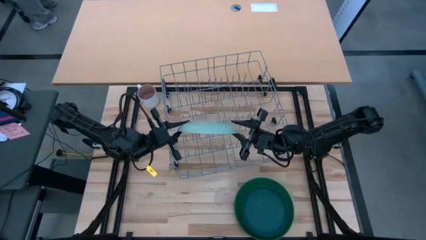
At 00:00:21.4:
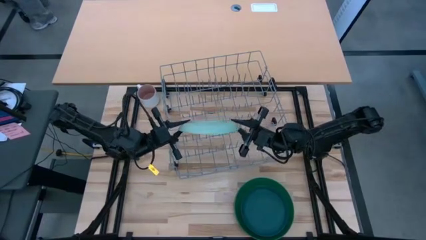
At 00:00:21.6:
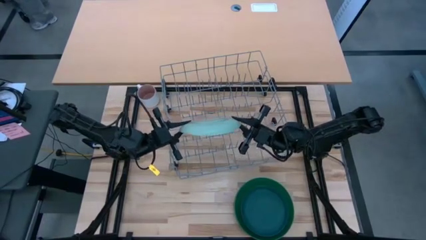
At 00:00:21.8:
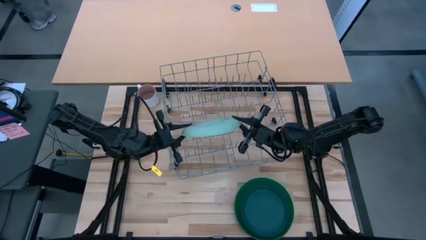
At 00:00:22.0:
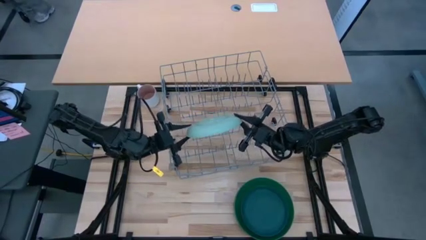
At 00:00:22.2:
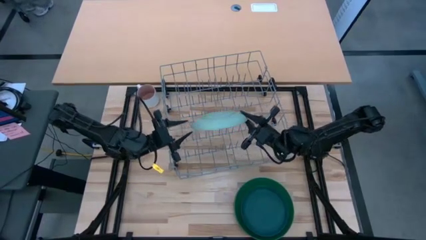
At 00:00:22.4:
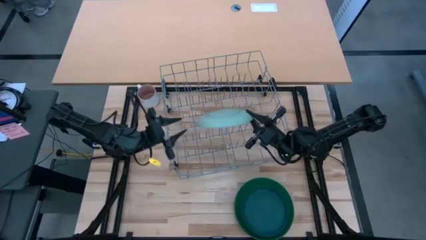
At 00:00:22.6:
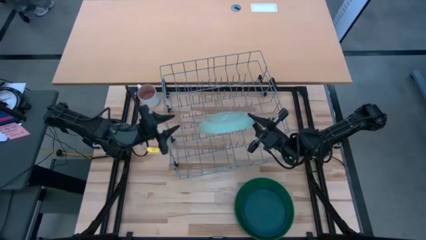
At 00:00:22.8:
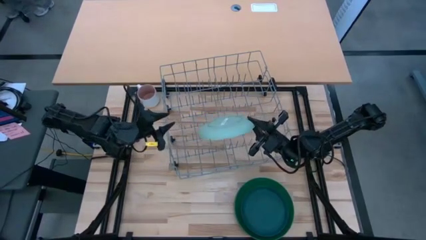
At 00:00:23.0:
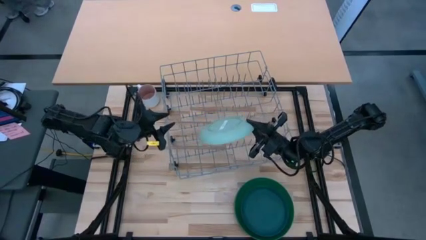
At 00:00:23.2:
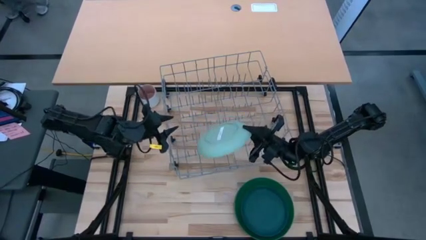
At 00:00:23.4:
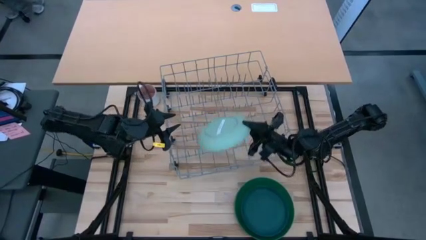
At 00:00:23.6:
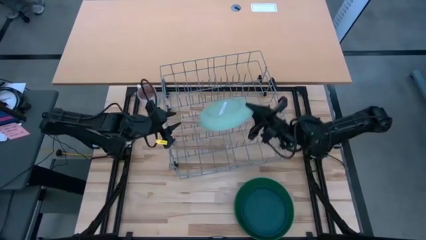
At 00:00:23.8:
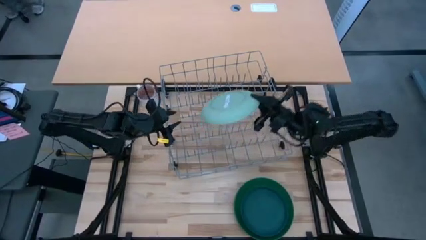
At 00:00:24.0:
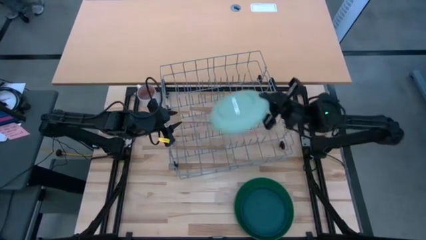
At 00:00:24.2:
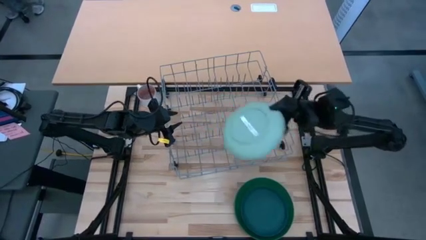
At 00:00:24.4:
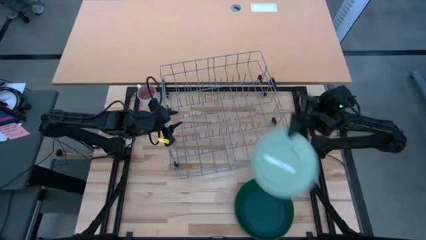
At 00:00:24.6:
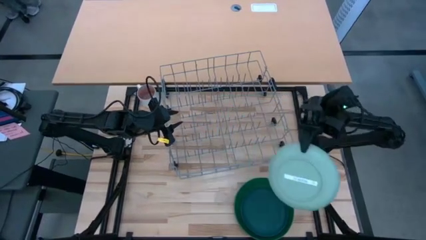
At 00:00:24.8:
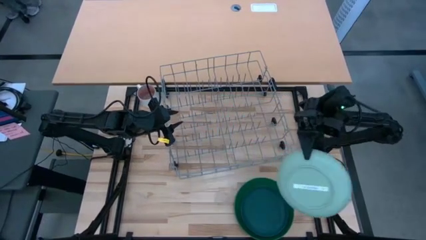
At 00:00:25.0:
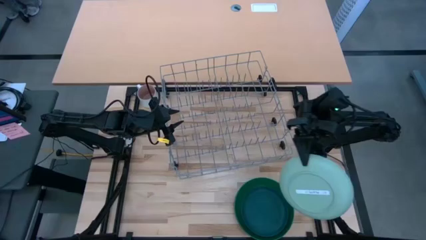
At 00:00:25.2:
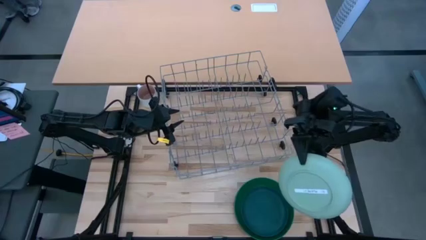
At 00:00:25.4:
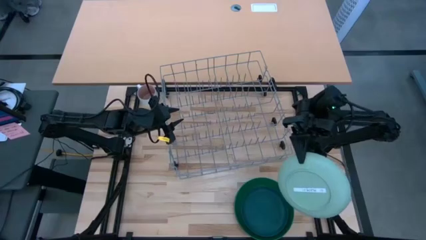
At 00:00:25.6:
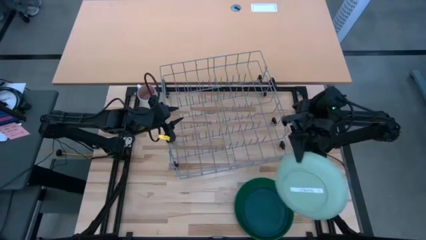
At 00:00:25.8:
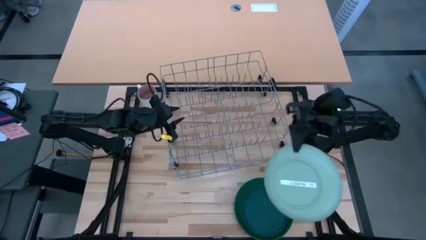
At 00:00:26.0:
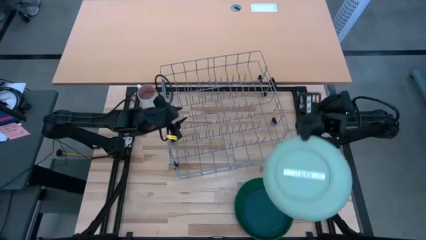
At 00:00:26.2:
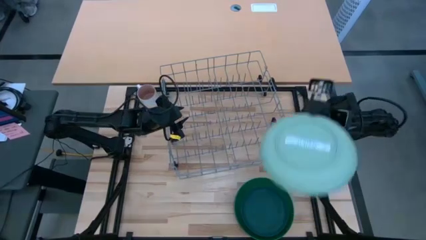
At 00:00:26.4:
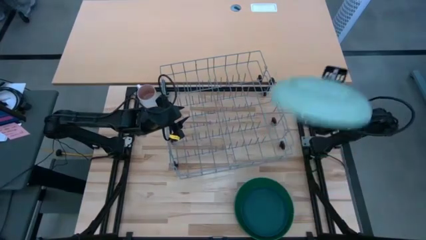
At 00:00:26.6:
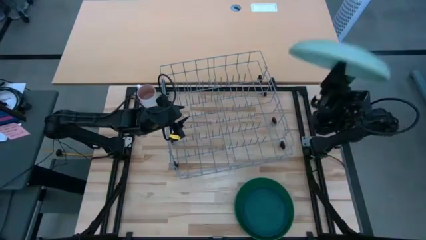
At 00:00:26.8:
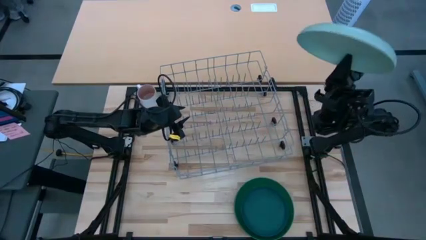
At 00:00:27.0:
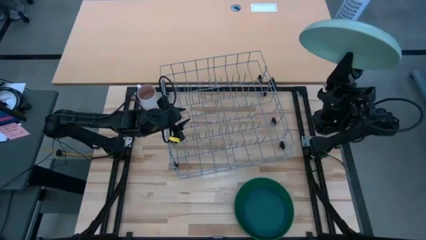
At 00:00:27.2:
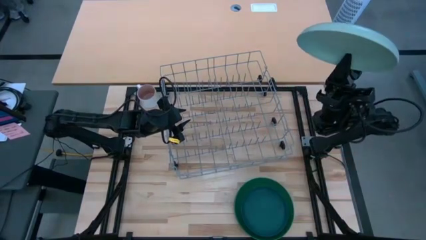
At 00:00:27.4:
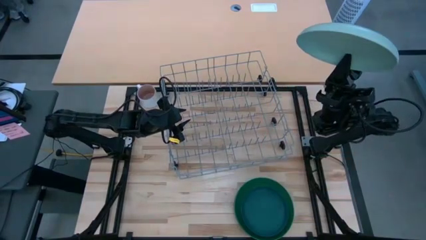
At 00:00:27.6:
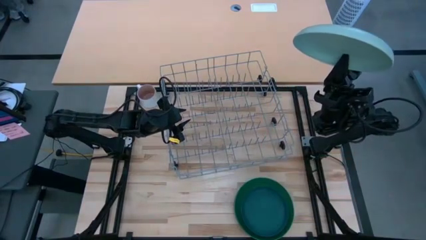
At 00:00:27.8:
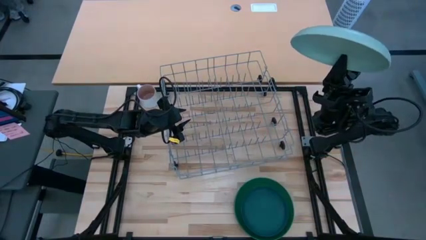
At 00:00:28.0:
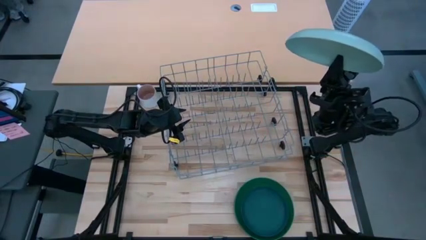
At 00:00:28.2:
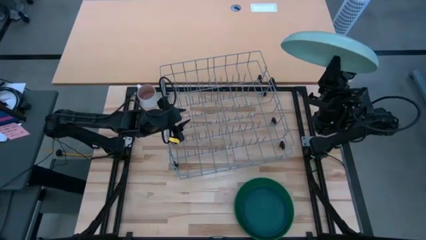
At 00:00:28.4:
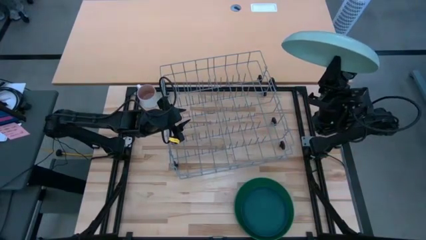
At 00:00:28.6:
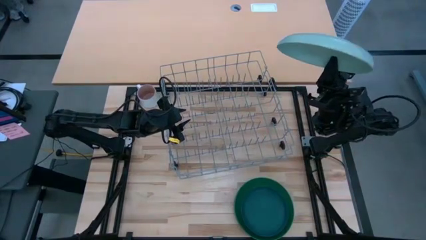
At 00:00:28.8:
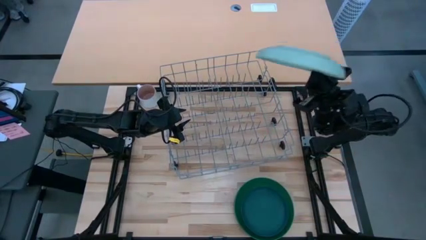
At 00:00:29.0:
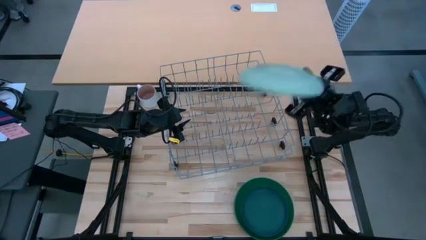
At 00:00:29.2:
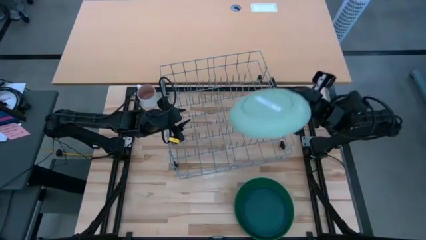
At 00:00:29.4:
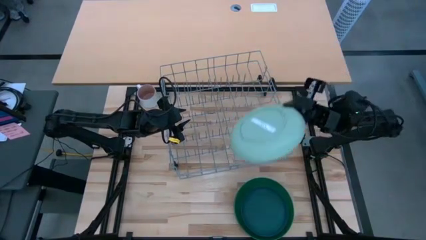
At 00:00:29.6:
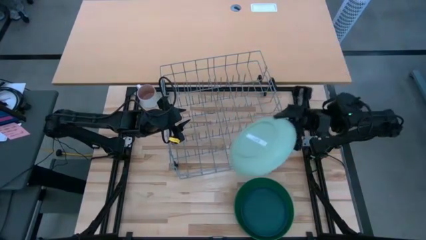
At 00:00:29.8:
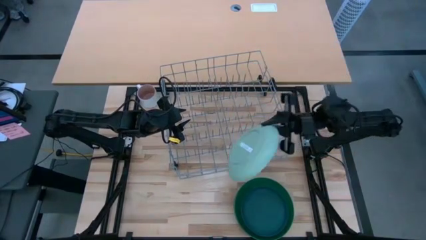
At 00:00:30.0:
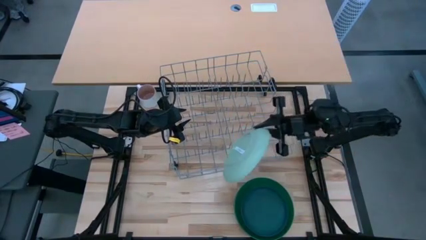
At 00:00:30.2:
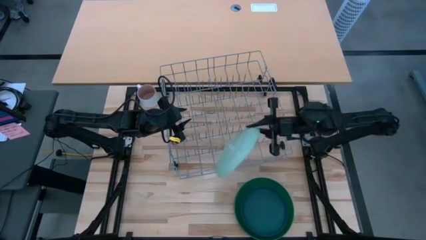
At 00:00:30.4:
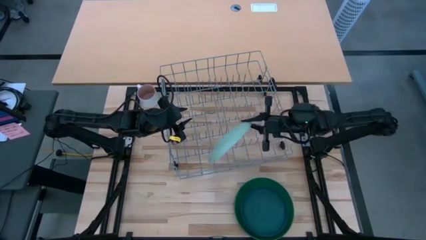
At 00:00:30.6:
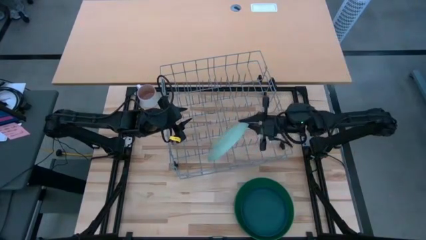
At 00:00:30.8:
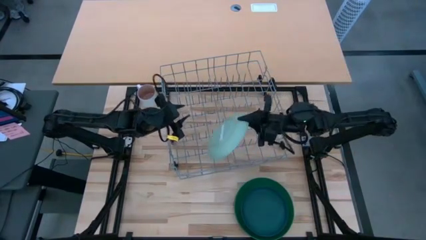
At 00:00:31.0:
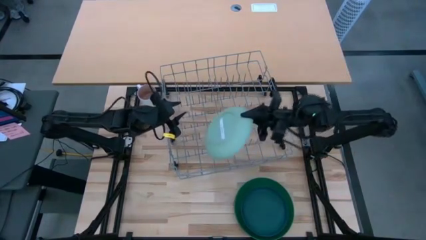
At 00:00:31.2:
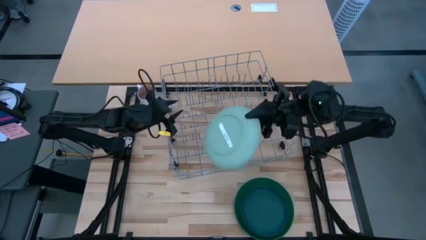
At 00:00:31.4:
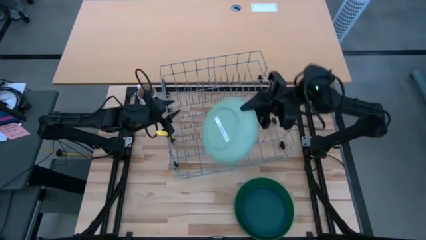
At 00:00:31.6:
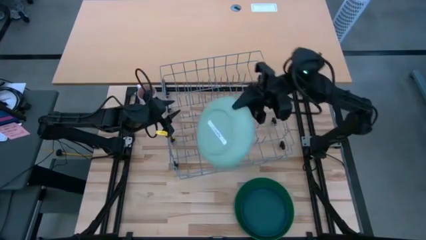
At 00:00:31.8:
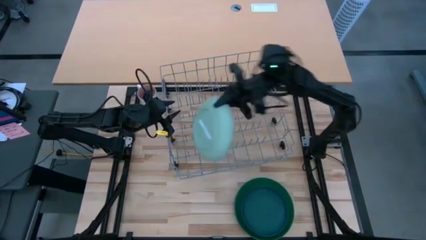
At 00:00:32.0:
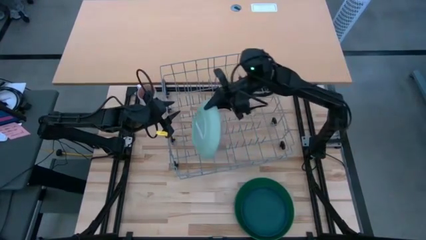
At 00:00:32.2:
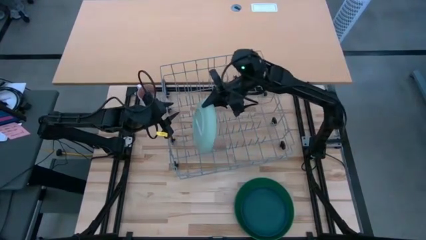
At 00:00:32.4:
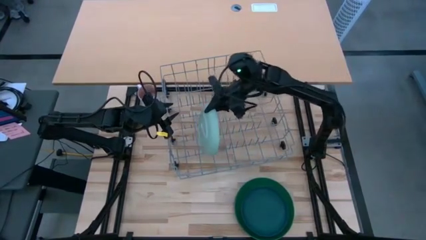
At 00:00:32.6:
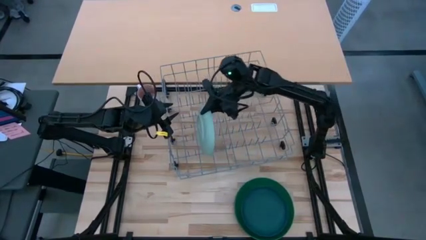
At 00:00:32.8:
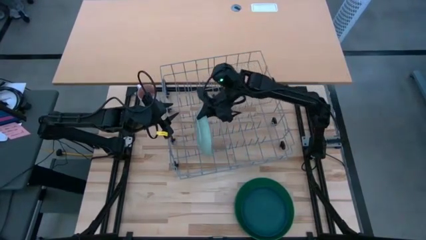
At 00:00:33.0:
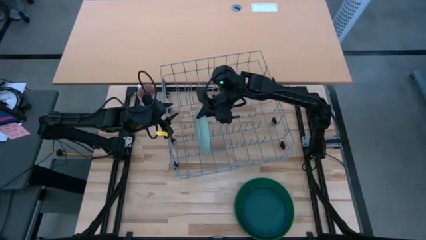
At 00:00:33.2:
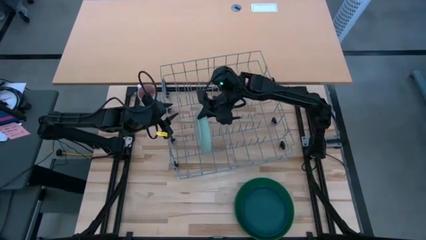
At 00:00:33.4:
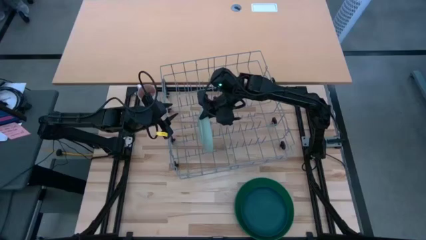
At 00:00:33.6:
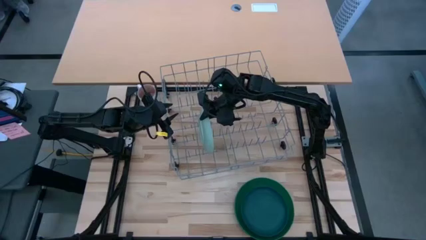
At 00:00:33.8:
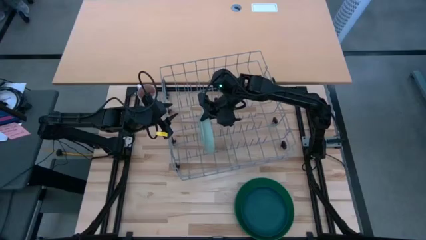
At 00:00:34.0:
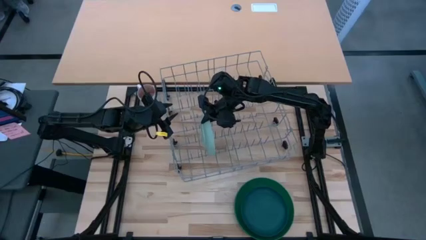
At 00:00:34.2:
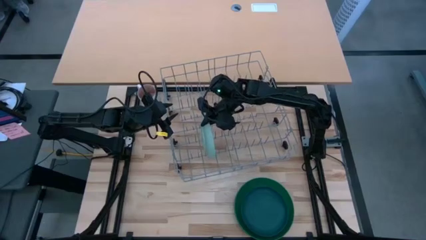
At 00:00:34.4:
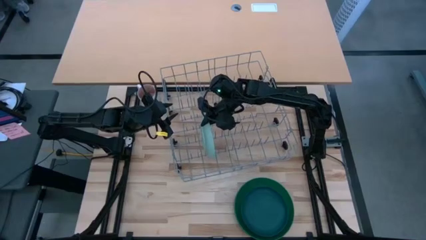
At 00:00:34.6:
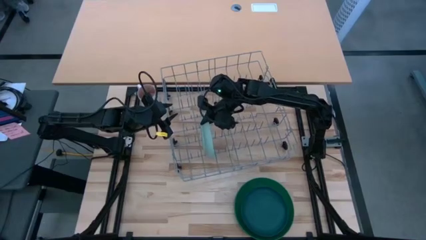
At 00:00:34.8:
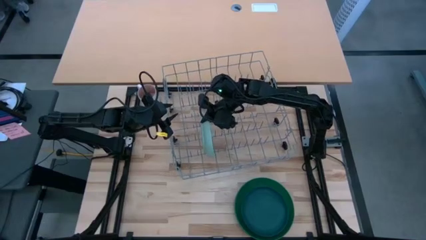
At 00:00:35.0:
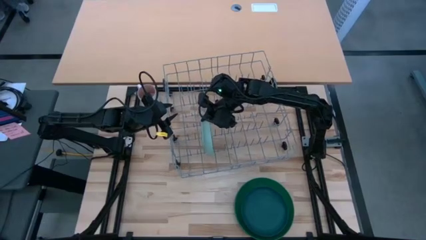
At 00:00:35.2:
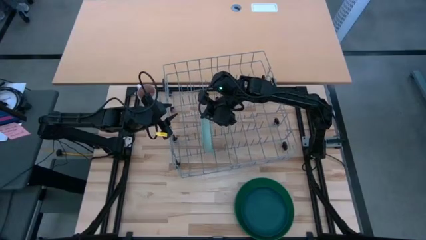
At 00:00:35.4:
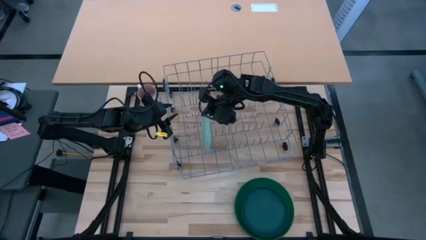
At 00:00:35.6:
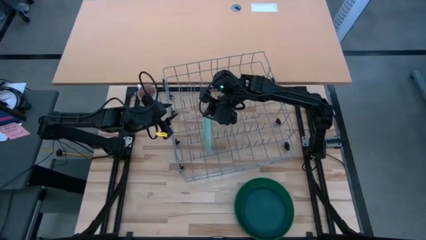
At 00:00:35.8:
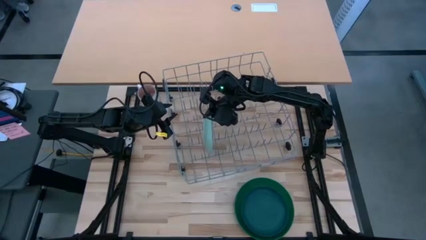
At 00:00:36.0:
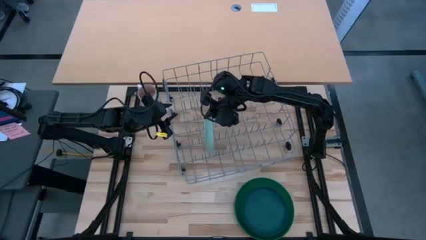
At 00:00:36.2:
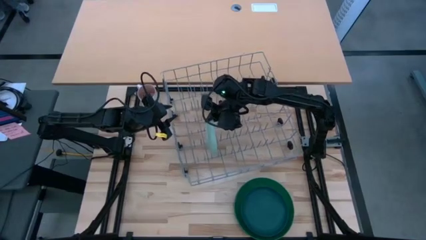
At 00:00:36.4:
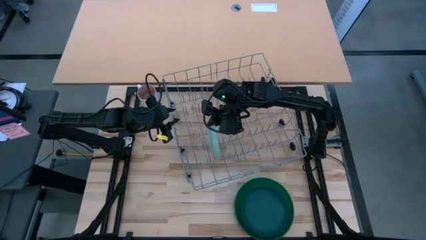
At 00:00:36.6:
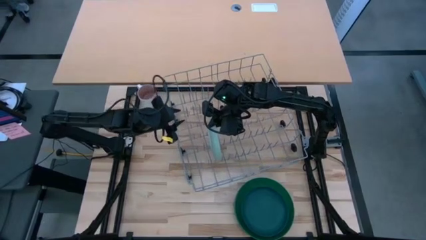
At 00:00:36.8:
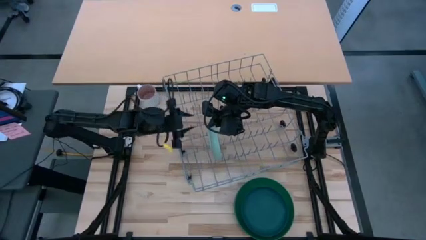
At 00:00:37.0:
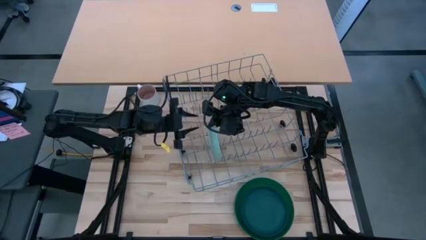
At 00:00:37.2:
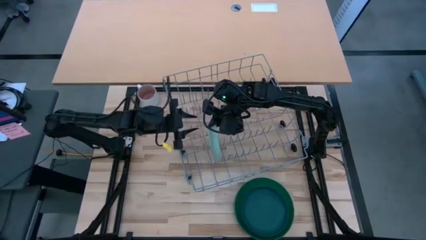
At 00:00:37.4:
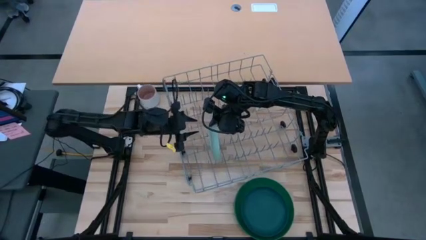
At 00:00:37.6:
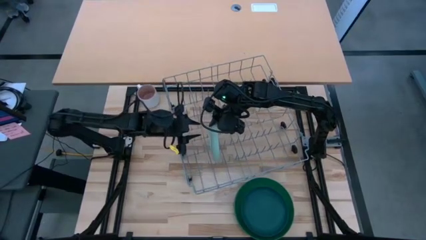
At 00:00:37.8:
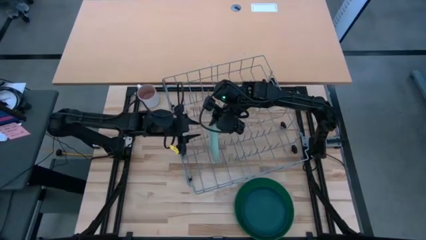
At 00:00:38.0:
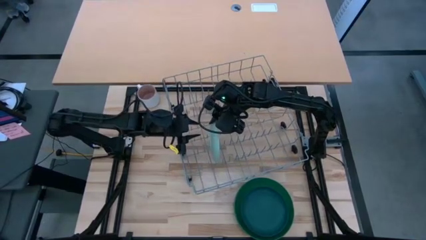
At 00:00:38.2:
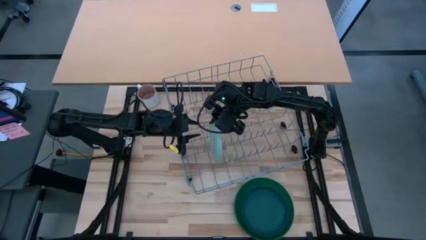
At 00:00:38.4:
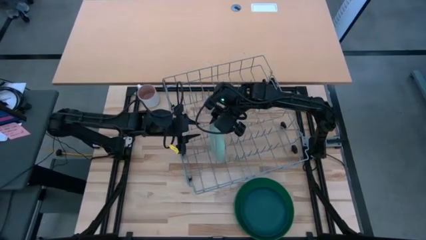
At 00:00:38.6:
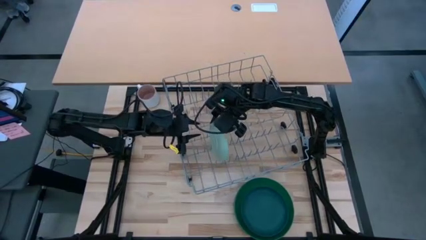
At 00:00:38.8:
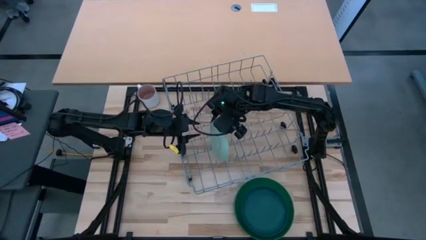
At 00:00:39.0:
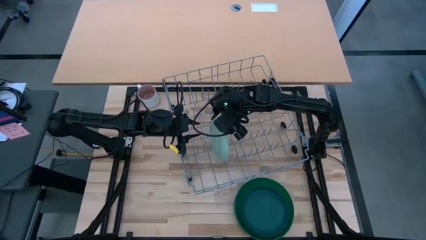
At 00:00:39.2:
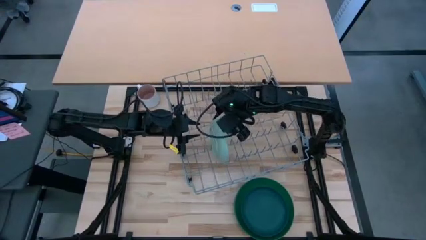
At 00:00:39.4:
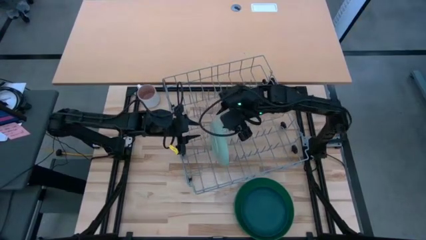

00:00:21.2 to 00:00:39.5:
Task: Sort dishes
Put the light green plate in the dish rack
